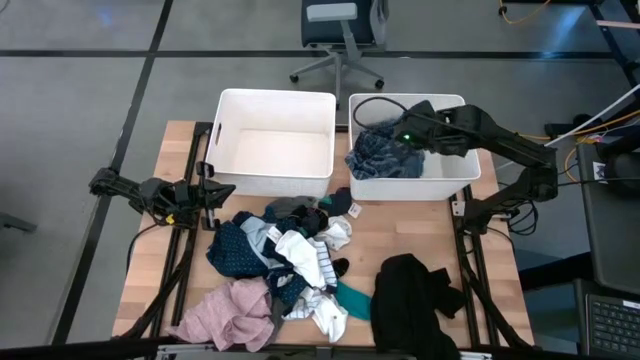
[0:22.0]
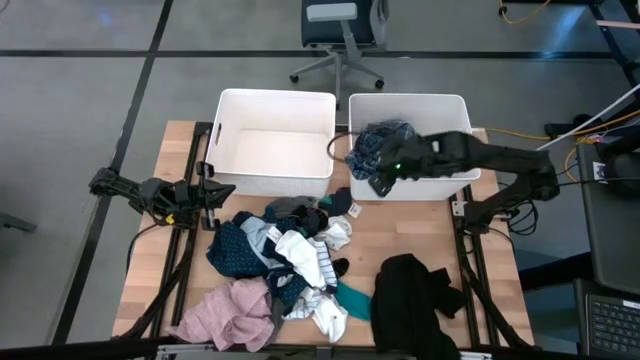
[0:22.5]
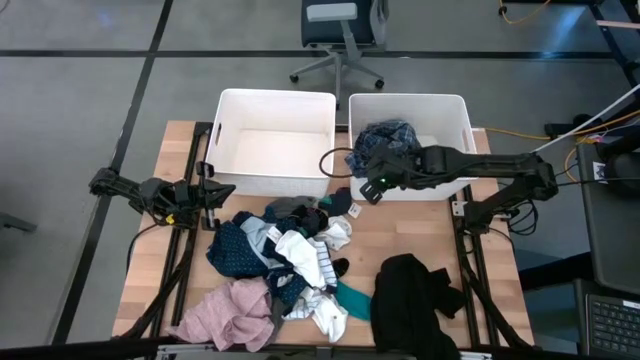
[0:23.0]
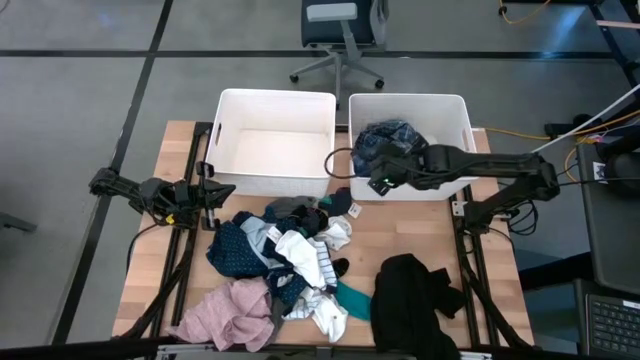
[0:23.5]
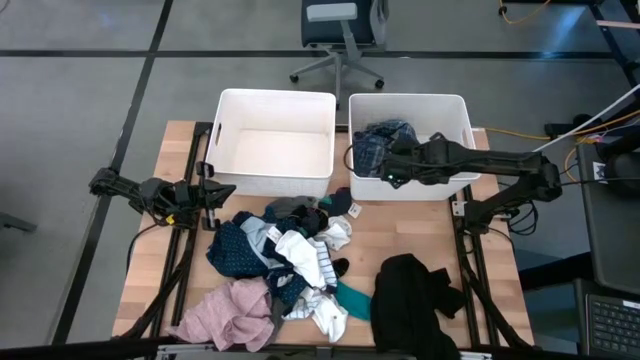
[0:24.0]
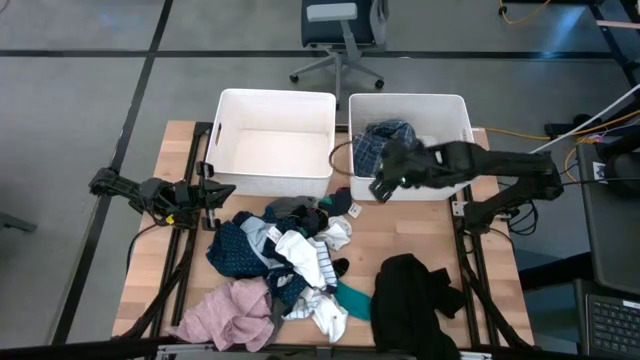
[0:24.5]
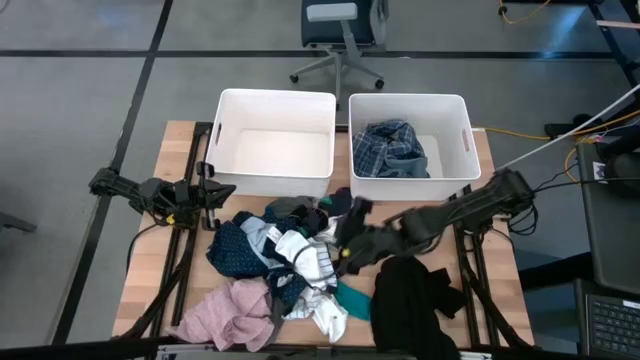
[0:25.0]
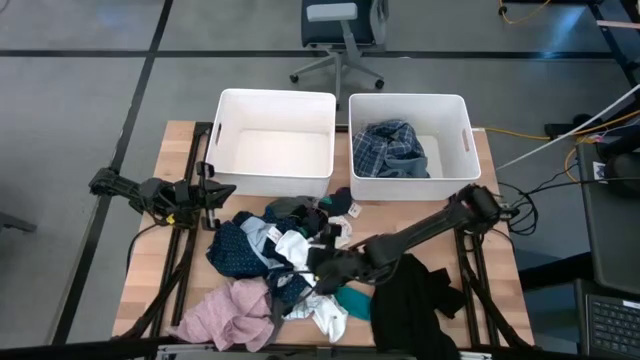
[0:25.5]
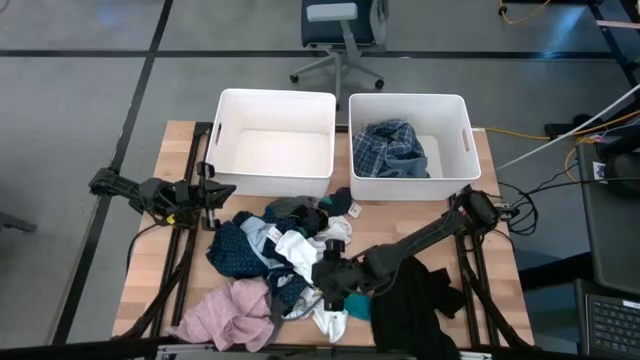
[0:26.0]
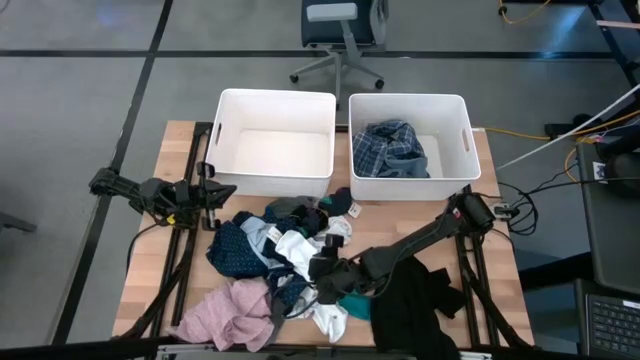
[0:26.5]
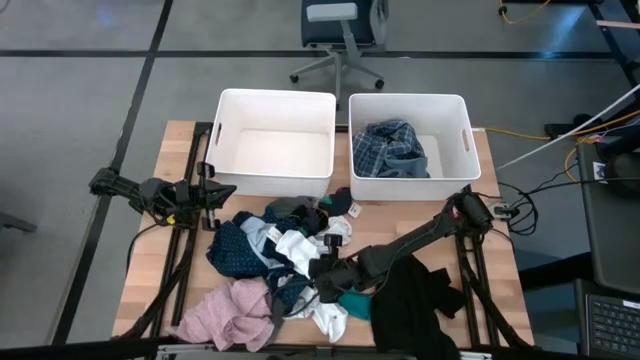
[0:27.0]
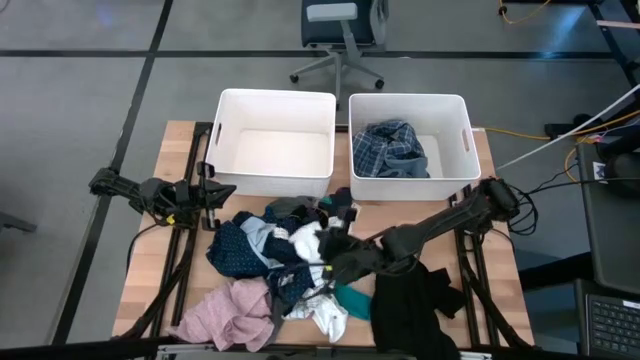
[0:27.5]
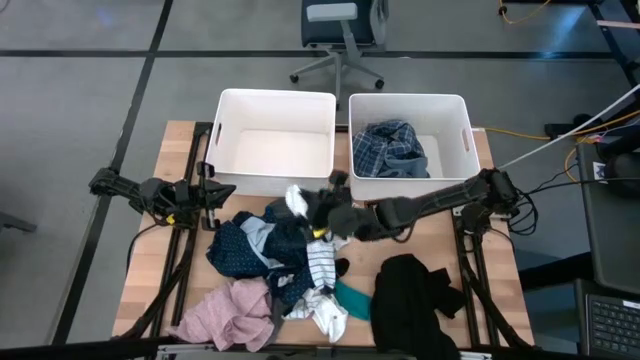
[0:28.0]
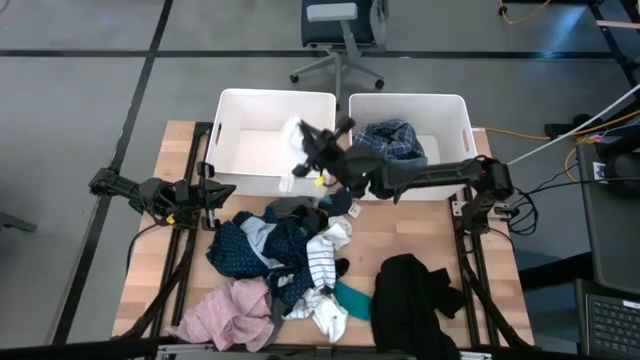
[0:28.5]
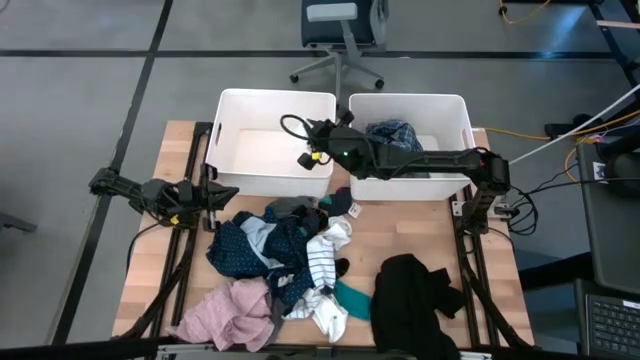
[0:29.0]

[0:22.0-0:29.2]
Task: Sort clothes
Put the white sock into the left white bin

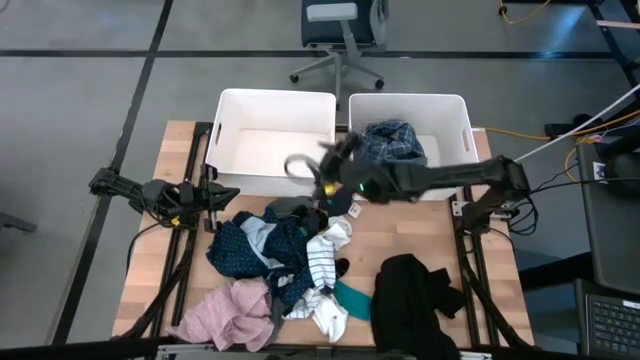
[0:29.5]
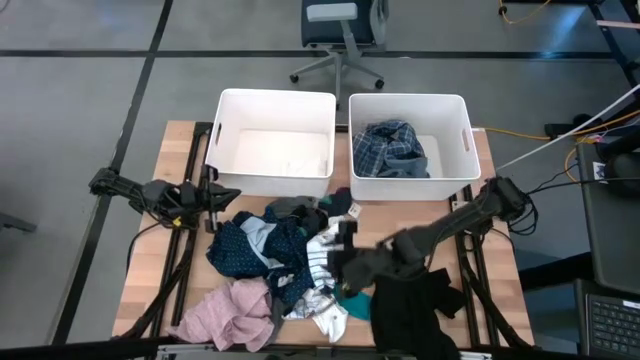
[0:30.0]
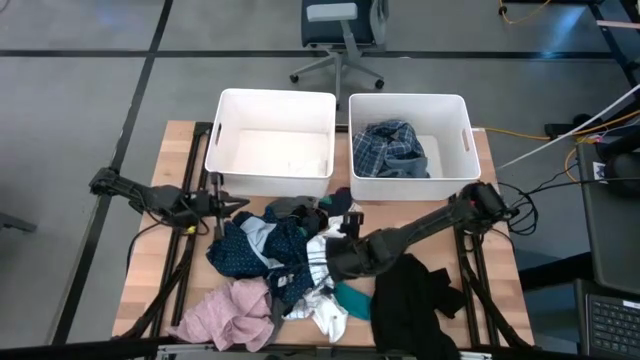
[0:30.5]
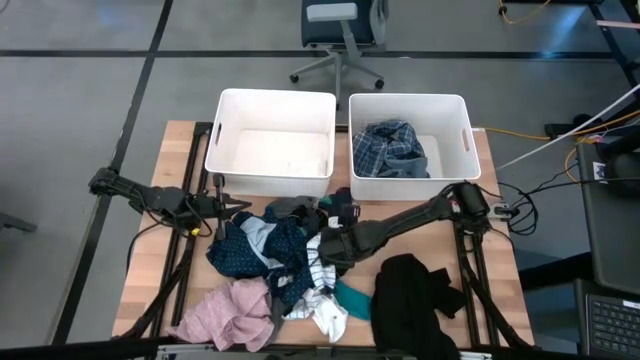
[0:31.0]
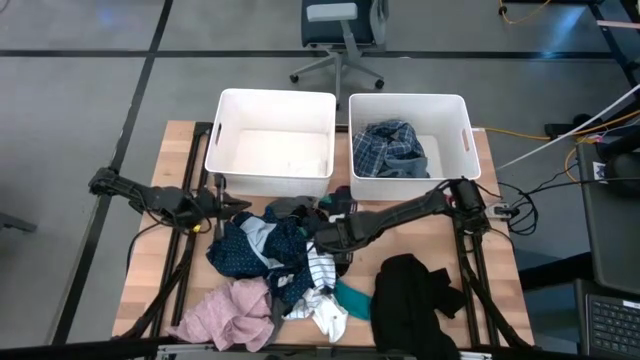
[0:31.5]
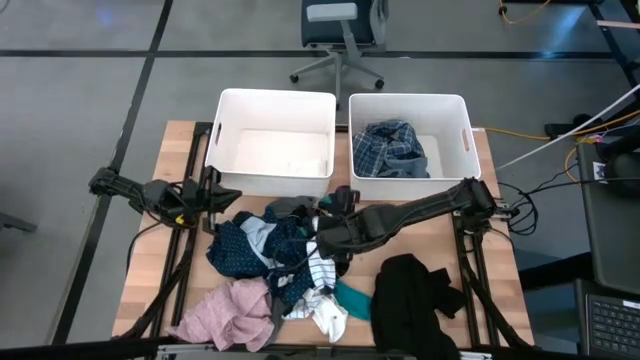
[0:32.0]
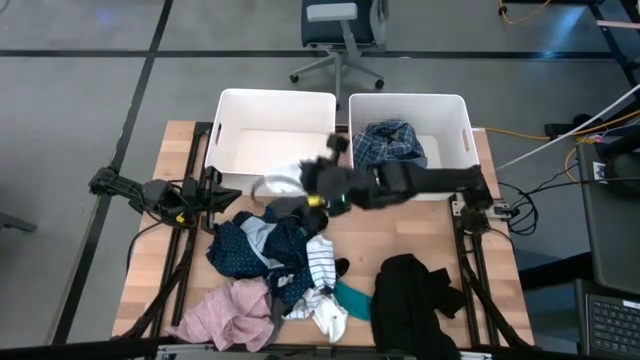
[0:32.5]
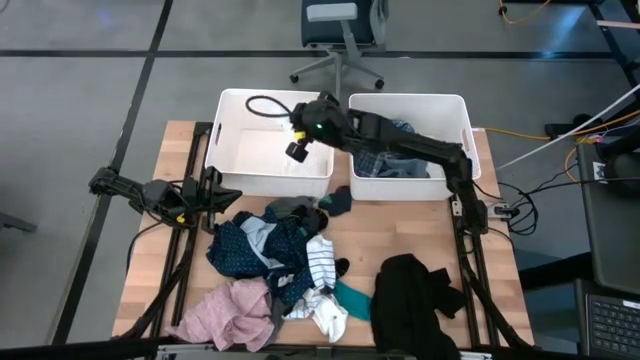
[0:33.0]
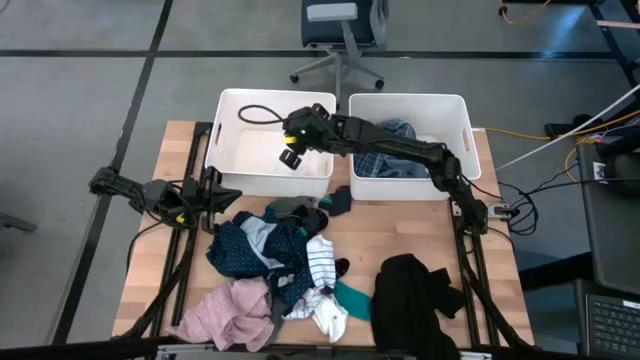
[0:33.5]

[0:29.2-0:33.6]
Put the white sock into the left white bin

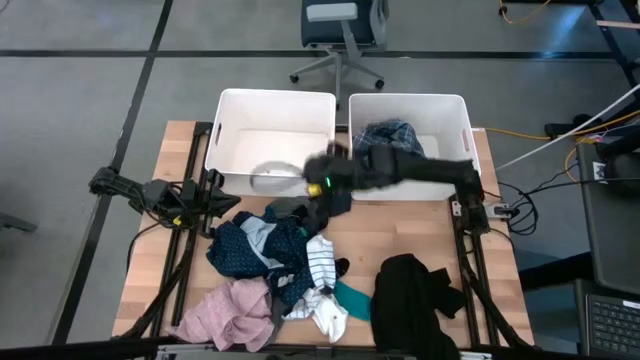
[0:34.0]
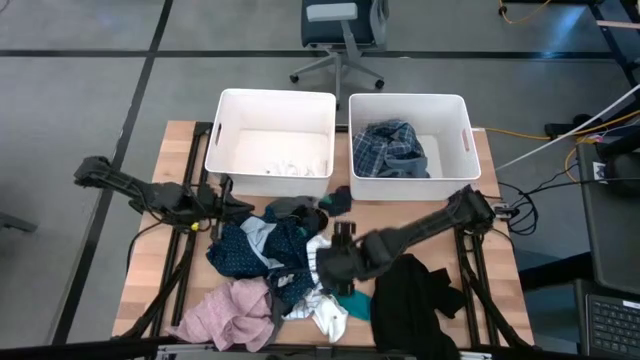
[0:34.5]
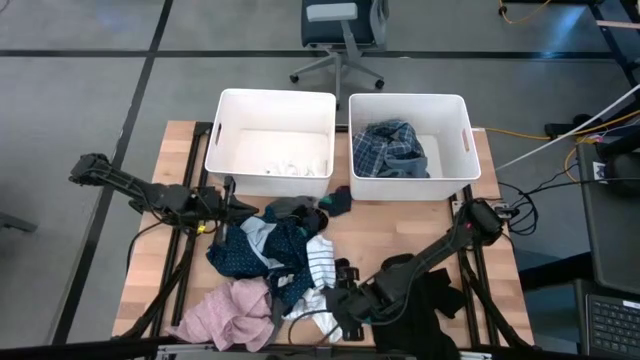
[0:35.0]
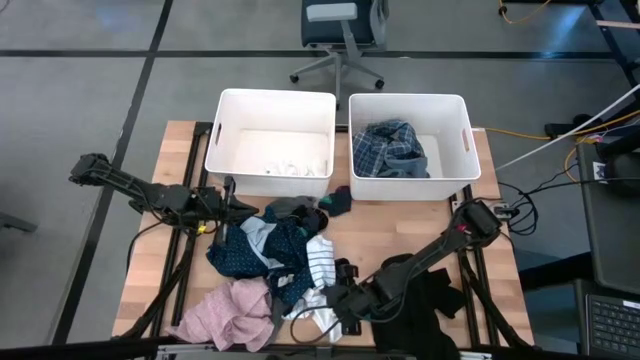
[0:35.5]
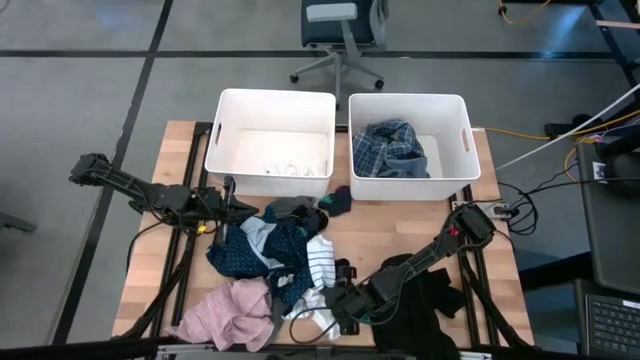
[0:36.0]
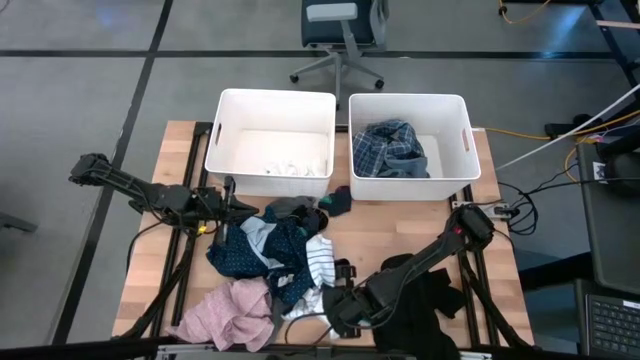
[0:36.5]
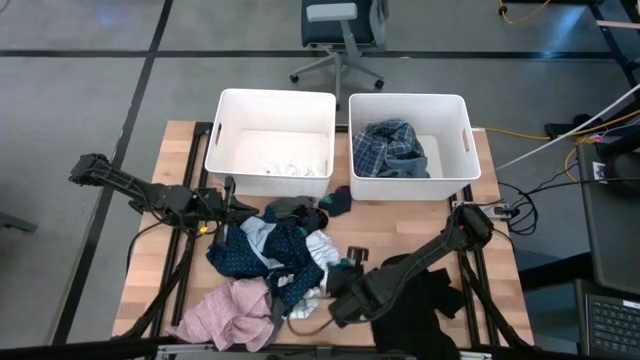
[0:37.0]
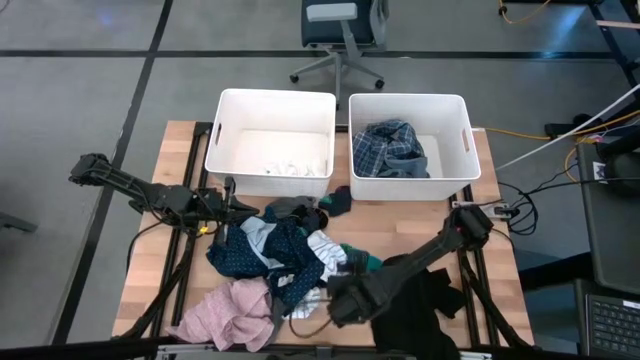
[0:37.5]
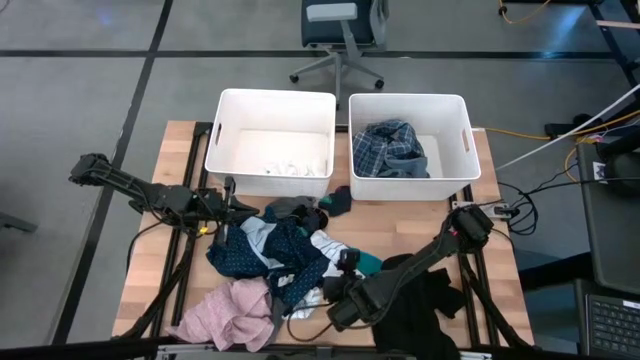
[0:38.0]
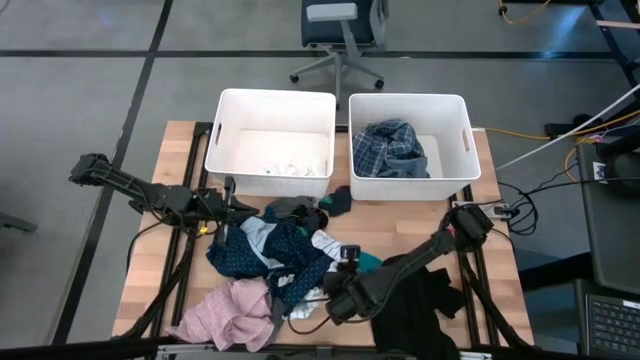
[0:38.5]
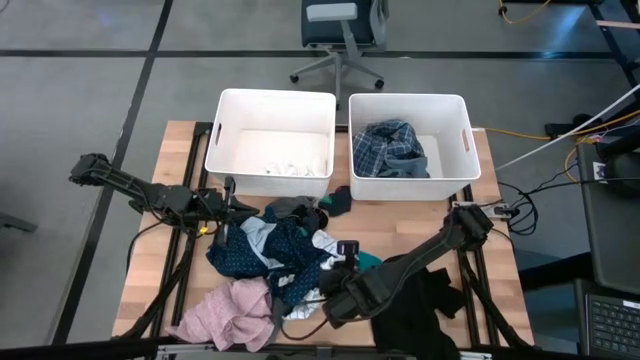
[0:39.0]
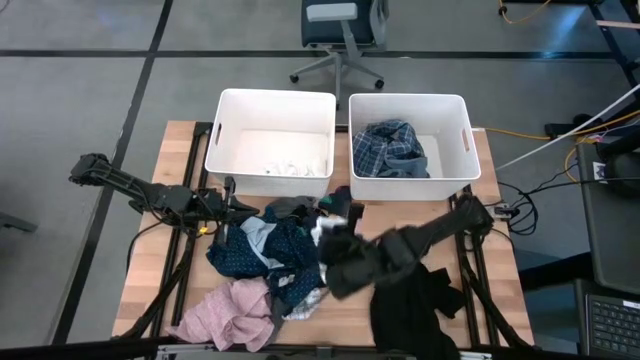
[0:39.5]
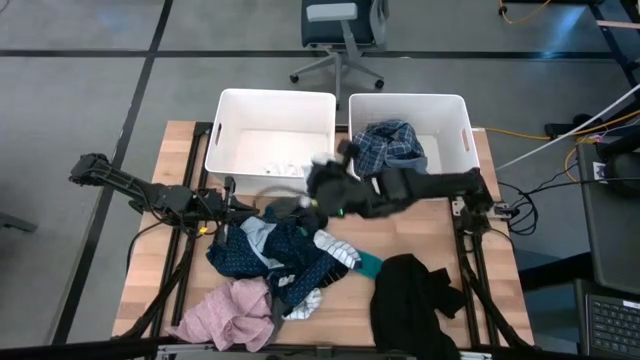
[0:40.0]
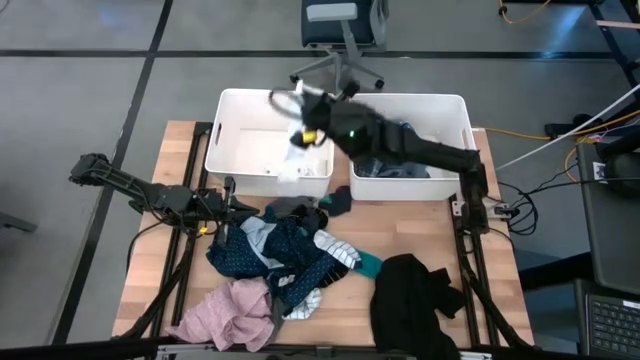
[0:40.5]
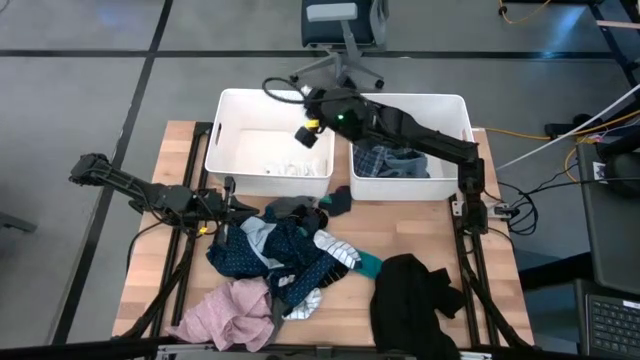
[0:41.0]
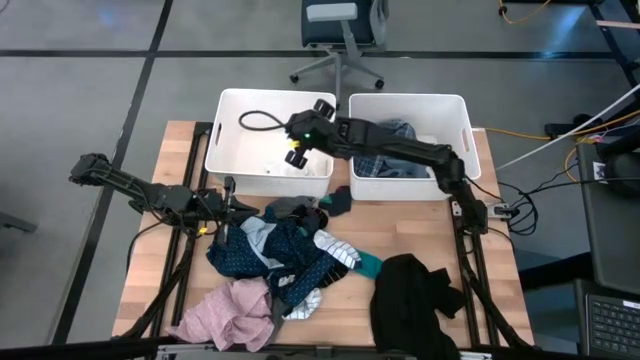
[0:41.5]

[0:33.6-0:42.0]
Put the white sock into the left white bin
